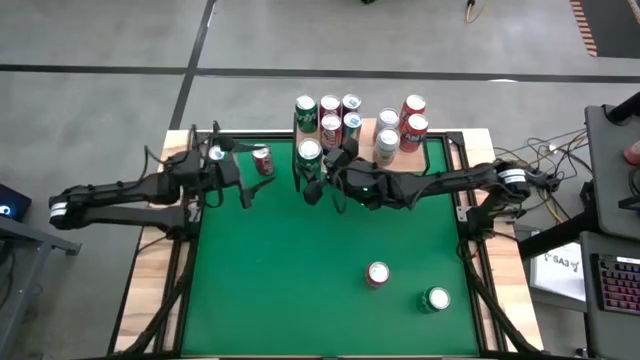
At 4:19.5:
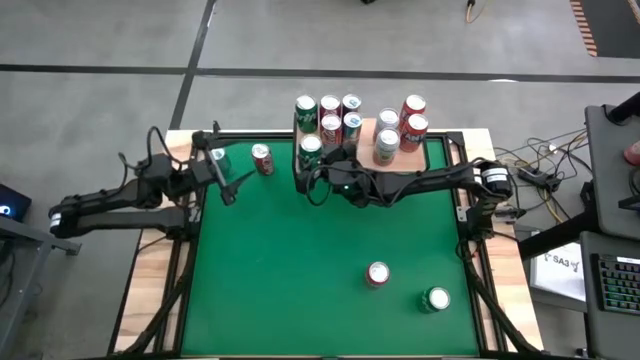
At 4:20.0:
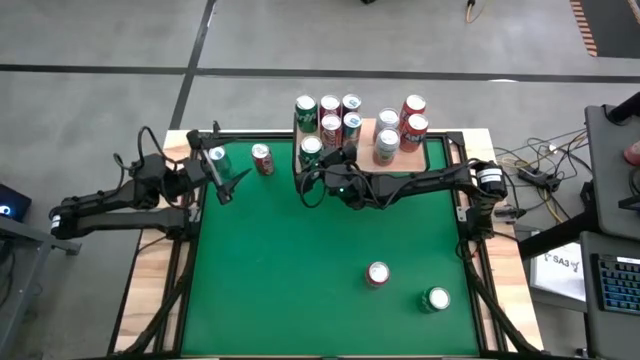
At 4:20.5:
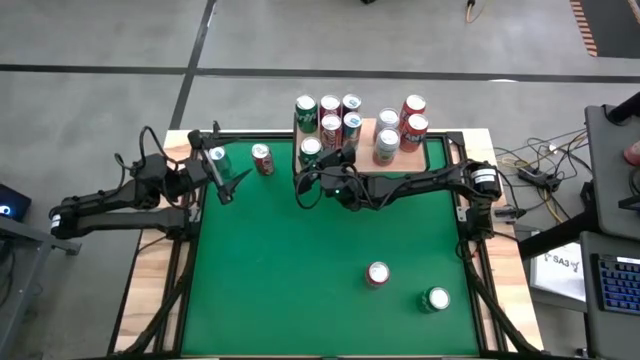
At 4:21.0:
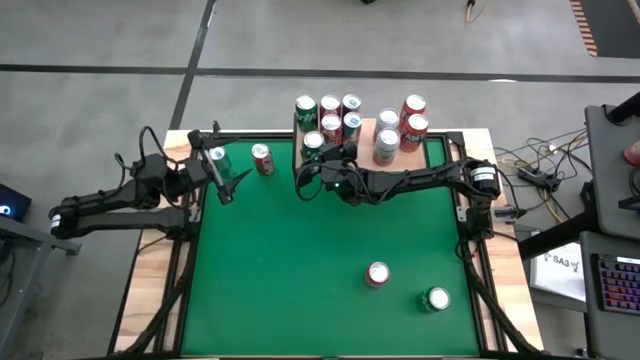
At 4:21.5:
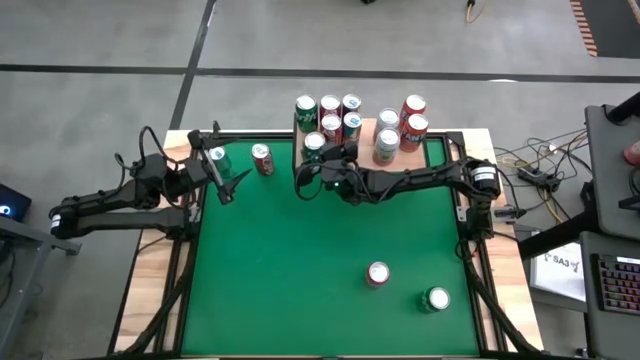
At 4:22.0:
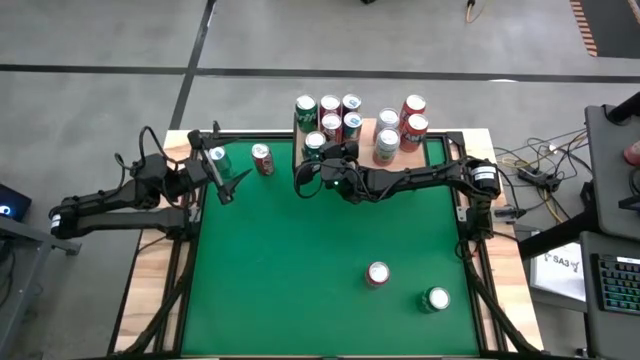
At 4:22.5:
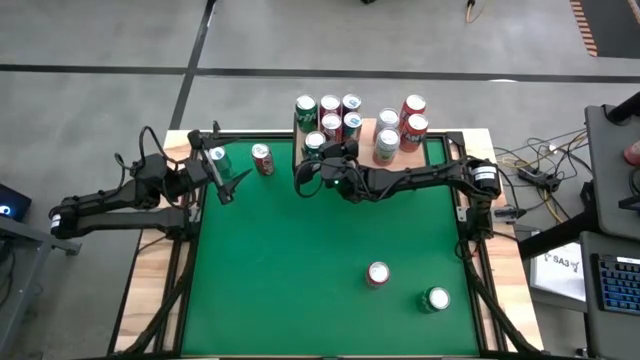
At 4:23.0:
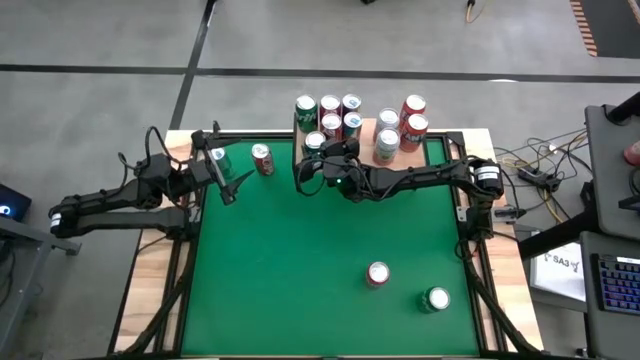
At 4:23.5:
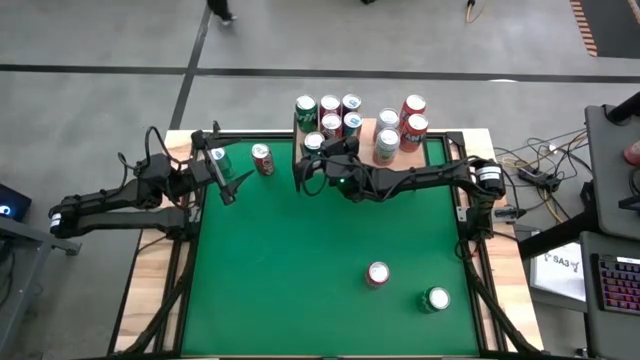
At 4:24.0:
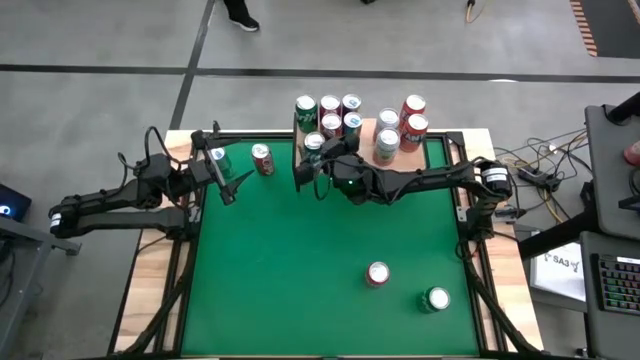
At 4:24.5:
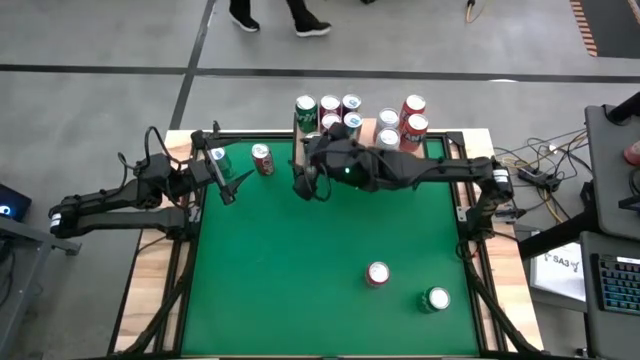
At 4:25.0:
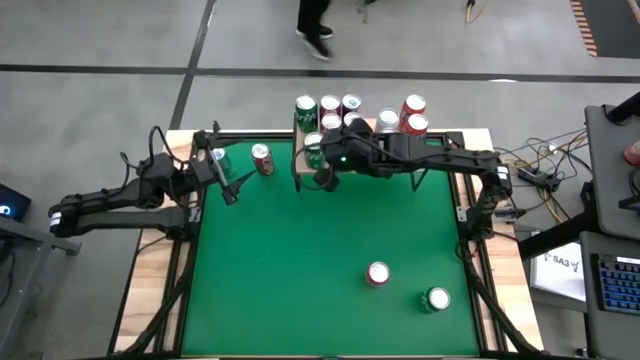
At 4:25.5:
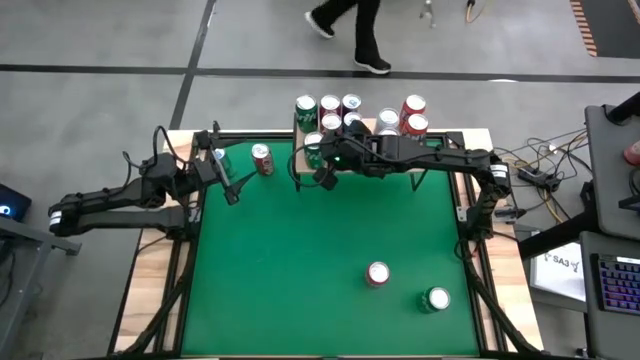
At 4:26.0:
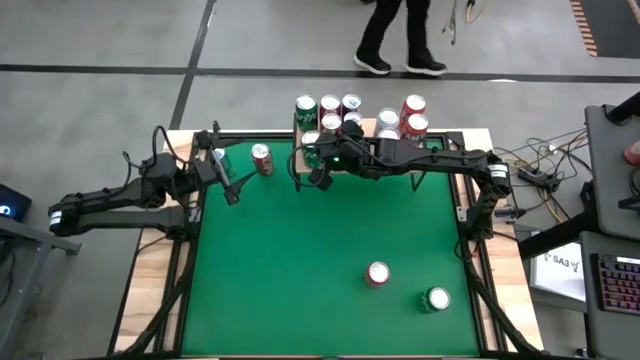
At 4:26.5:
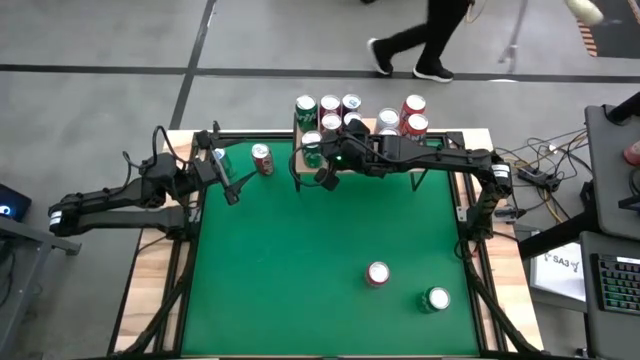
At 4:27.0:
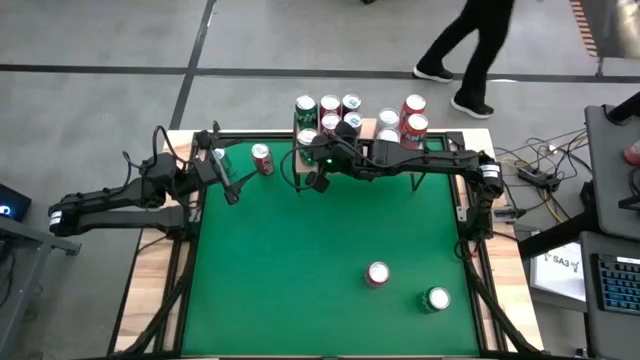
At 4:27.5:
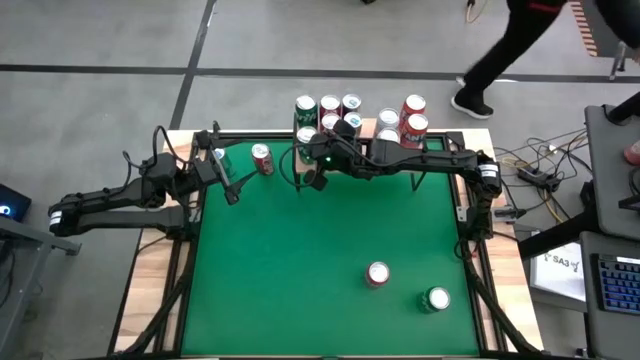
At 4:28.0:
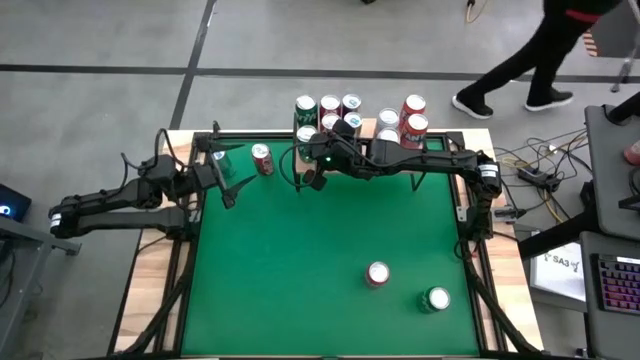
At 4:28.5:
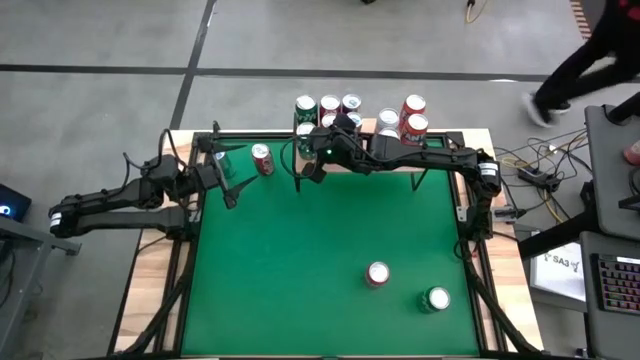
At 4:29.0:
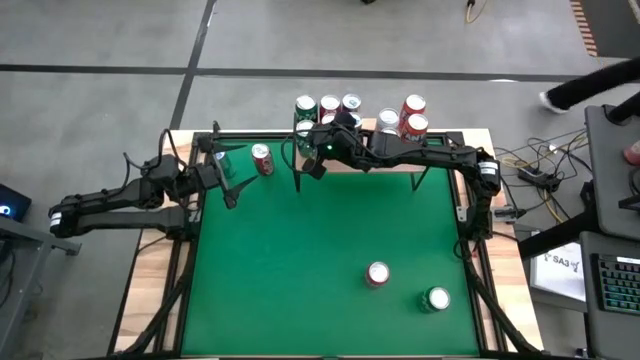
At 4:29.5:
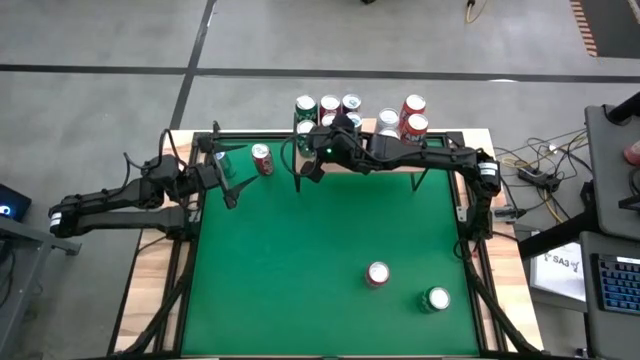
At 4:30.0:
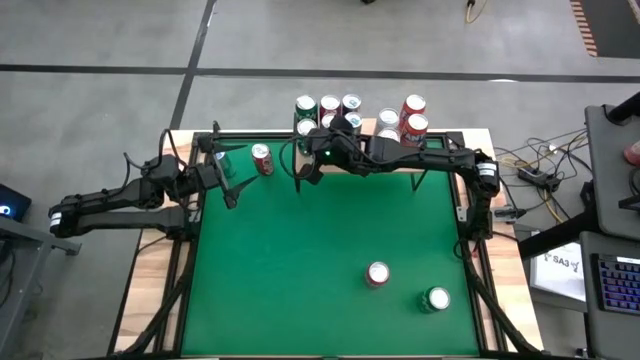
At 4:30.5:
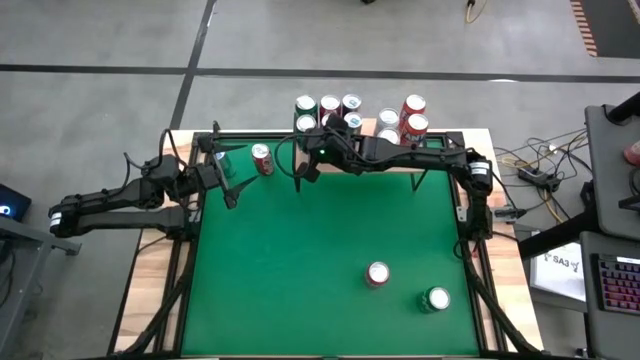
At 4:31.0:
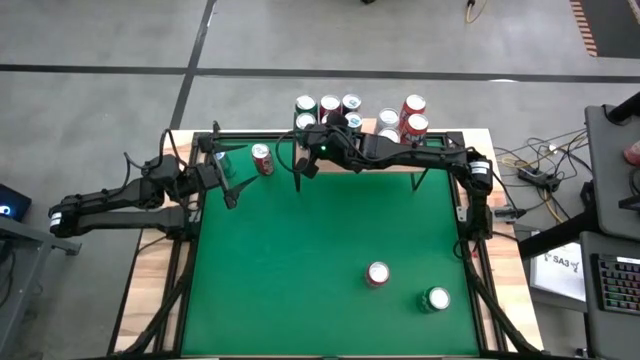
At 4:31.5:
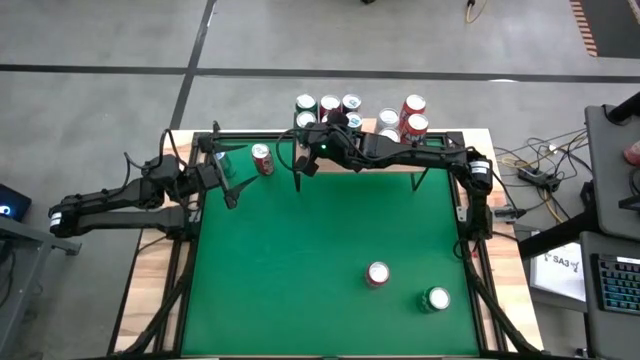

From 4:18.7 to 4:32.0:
Task: Place canned beverage on shelf
Put the top green soda can aligned with the green soda can on the shelf

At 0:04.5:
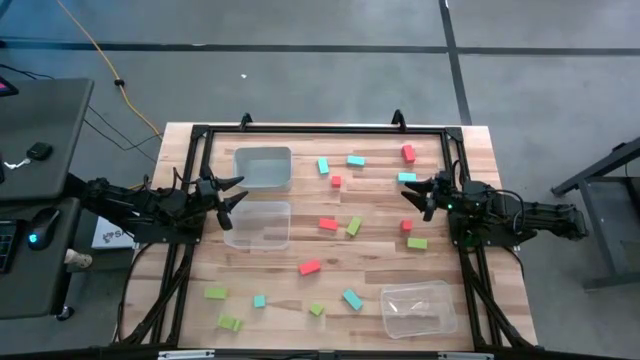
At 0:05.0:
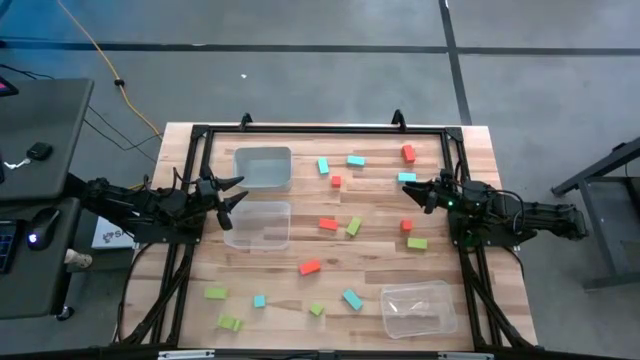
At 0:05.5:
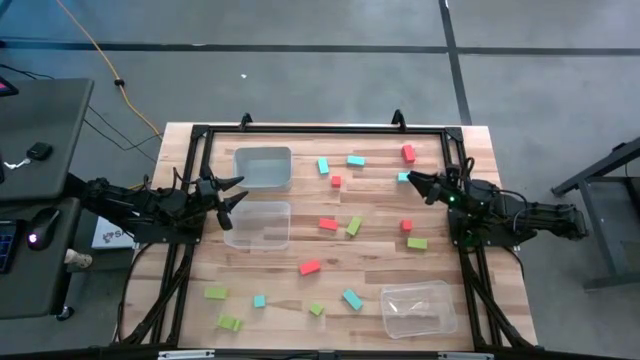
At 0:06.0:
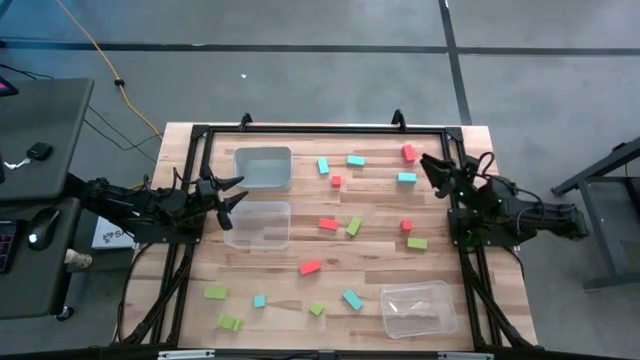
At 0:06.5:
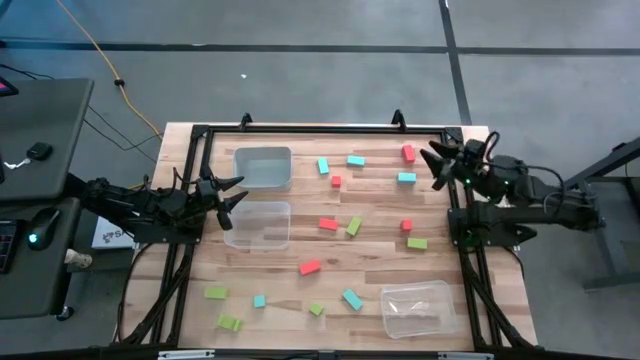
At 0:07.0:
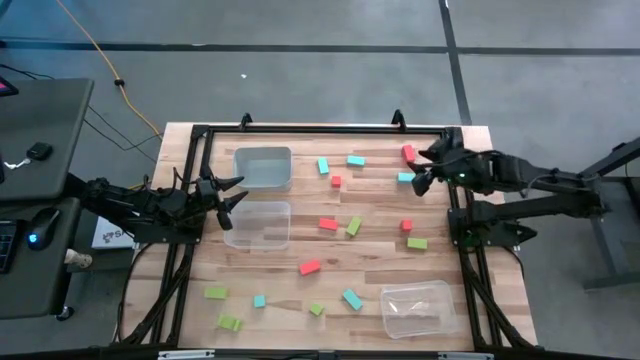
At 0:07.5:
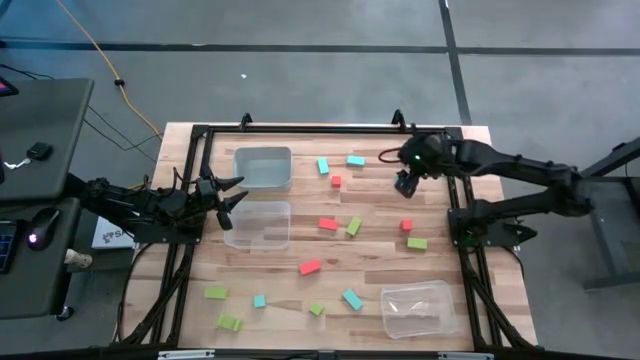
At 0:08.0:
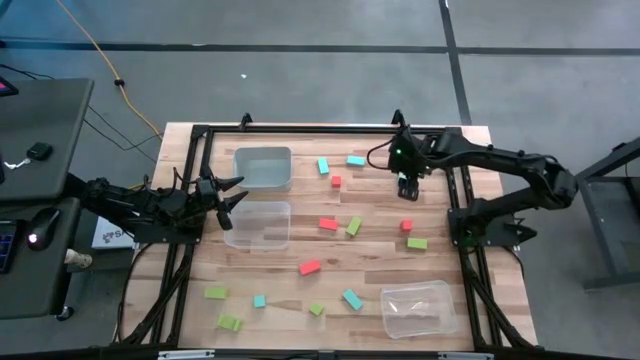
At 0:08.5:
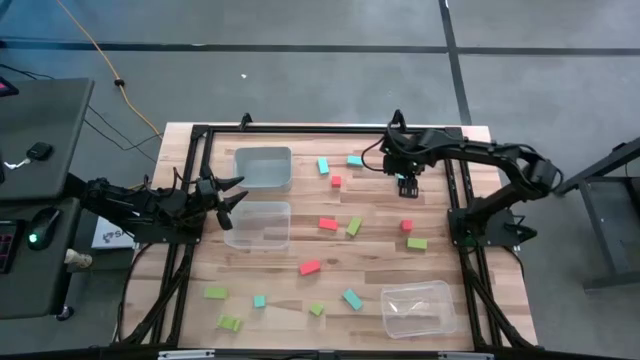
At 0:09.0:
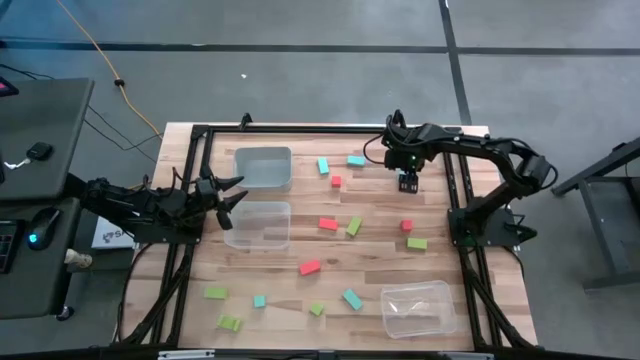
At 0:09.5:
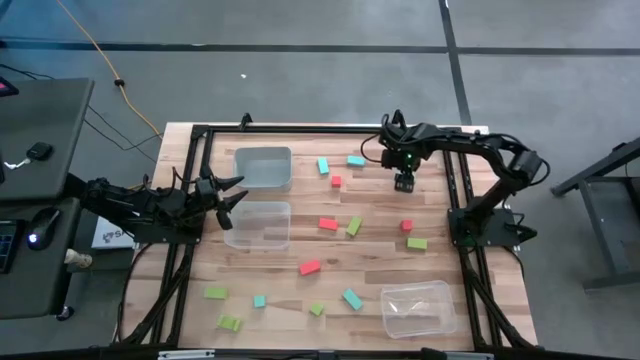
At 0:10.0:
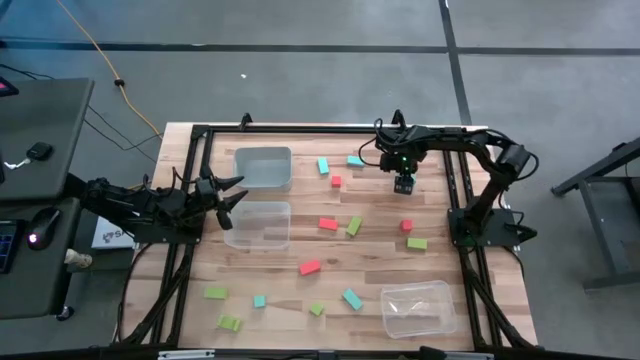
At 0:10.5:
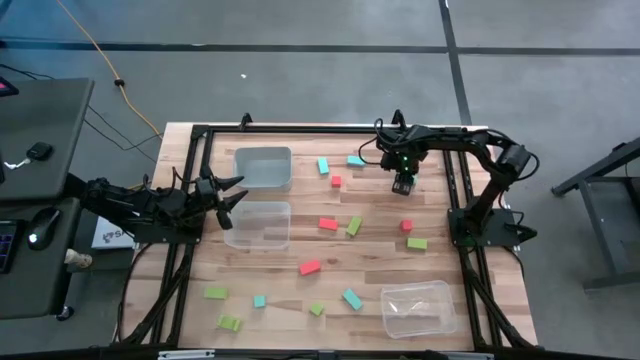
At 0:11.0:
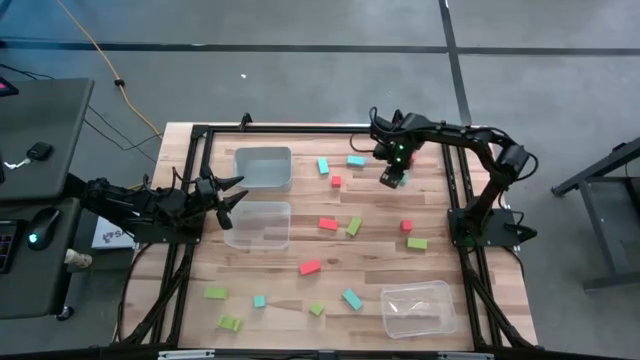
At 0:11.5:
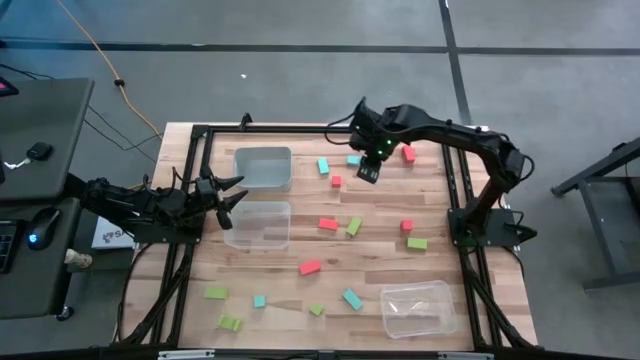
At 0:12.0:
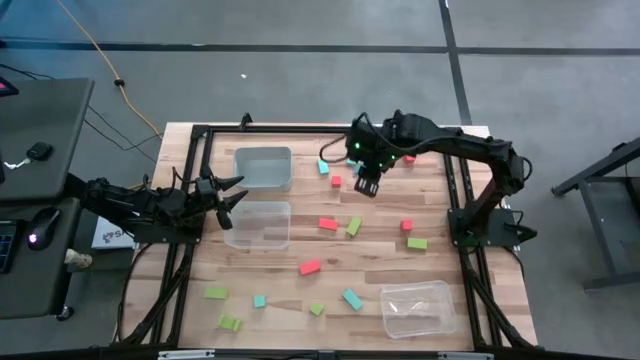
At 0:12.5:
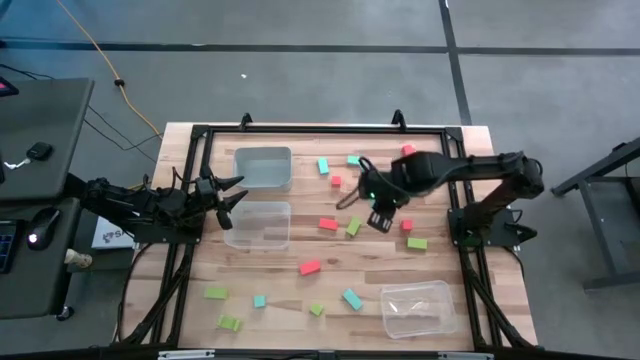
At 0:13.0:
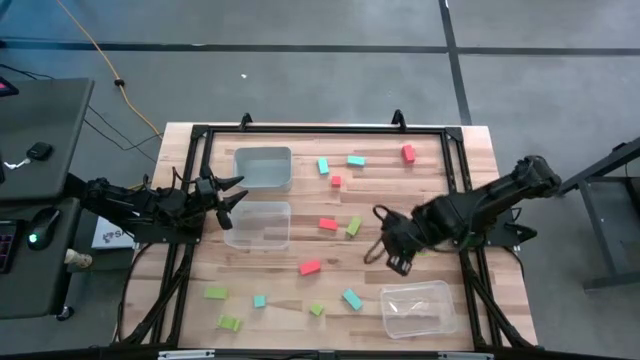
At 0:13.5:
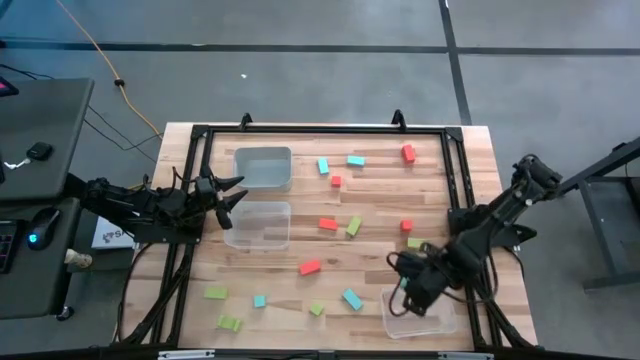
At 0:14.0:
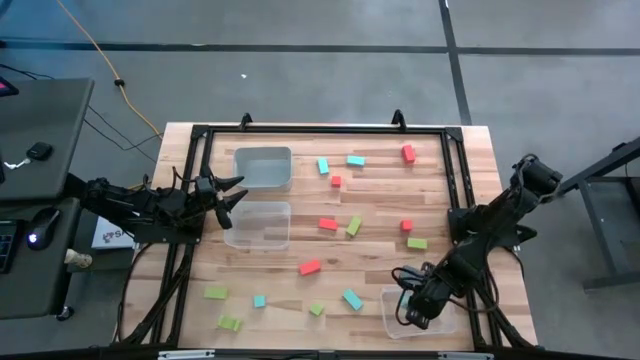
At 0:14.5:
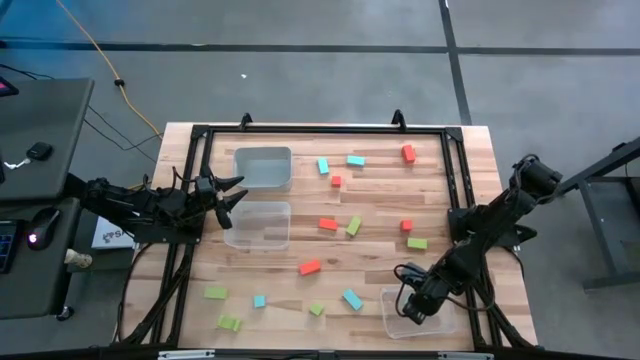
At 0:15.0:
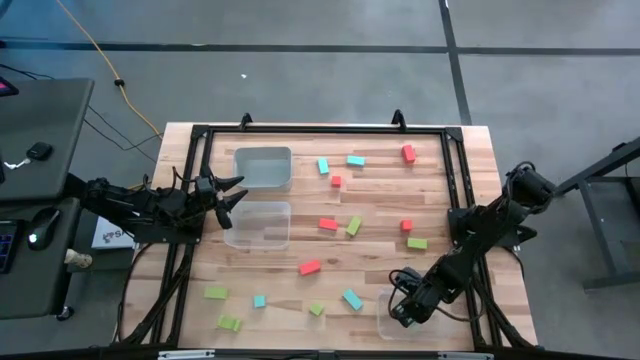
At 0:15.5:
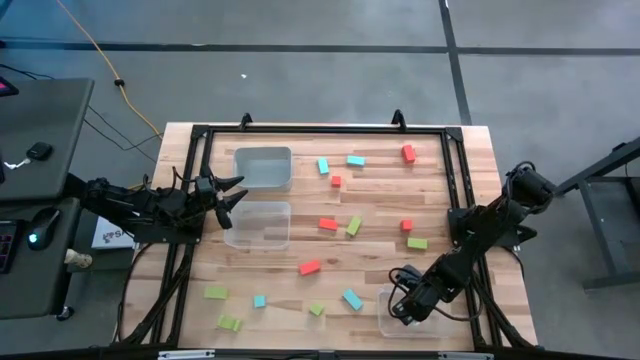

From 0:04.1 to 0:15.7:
Task: Sort & place blocks by color
Put the blue block into the bottom transparent bin
